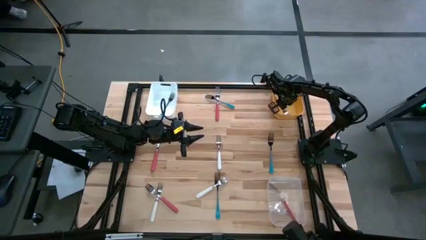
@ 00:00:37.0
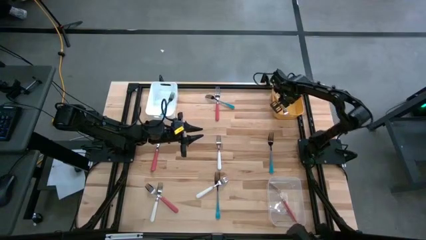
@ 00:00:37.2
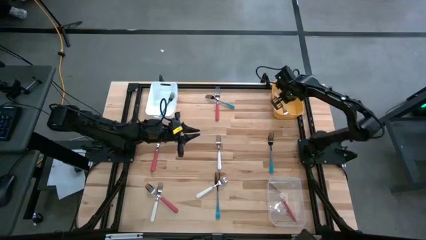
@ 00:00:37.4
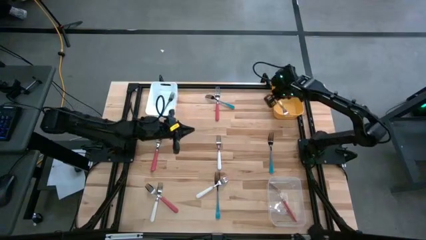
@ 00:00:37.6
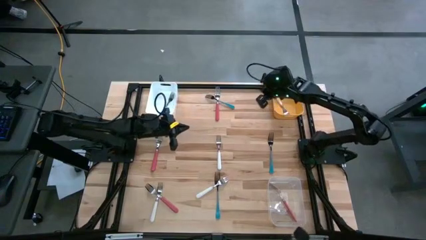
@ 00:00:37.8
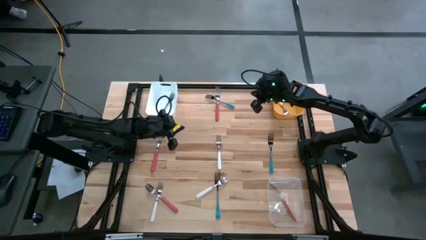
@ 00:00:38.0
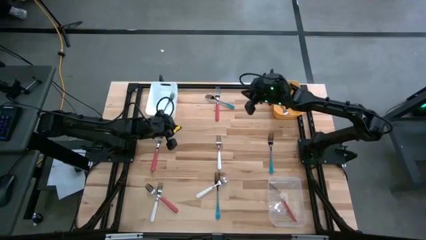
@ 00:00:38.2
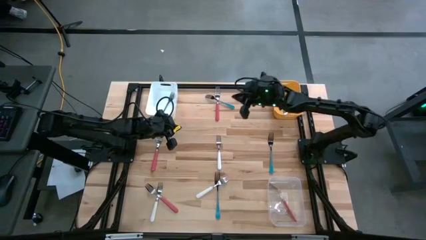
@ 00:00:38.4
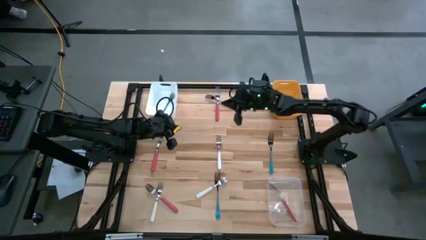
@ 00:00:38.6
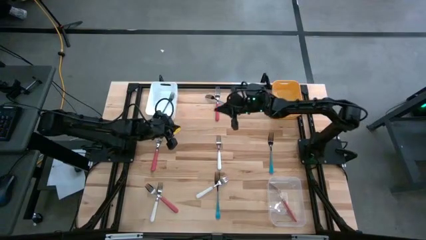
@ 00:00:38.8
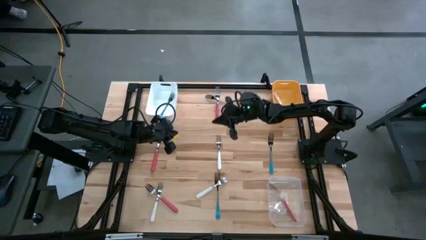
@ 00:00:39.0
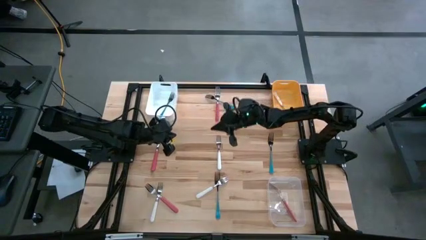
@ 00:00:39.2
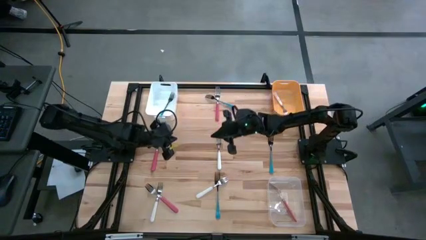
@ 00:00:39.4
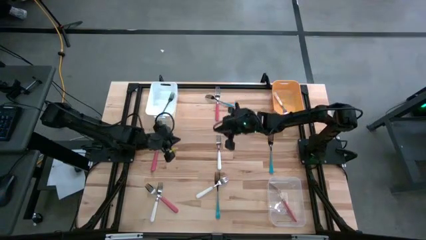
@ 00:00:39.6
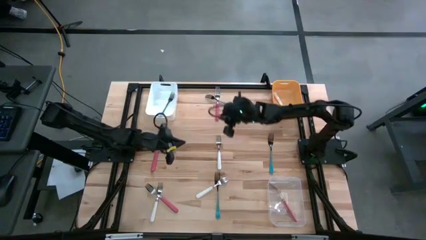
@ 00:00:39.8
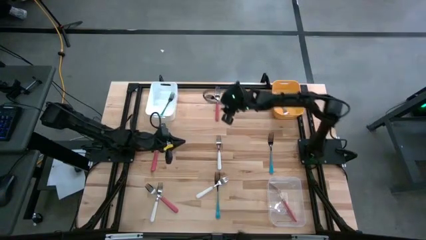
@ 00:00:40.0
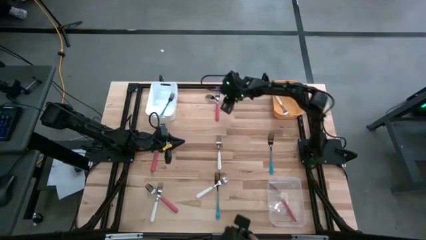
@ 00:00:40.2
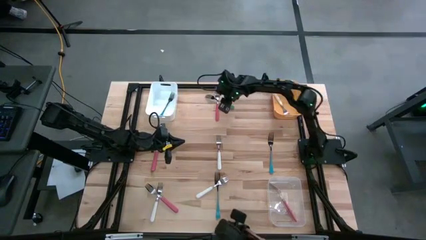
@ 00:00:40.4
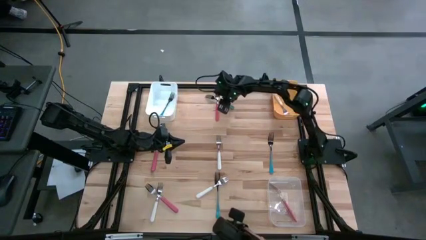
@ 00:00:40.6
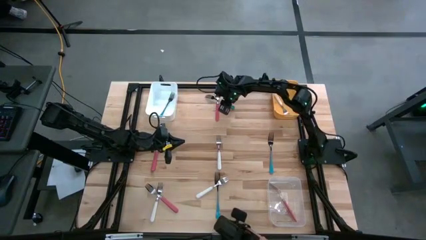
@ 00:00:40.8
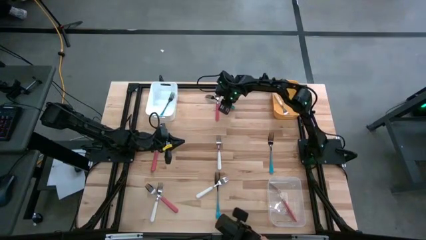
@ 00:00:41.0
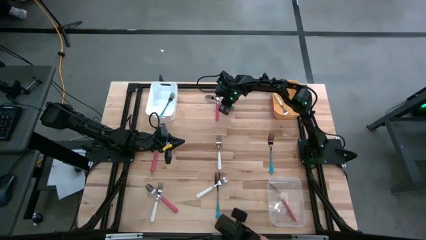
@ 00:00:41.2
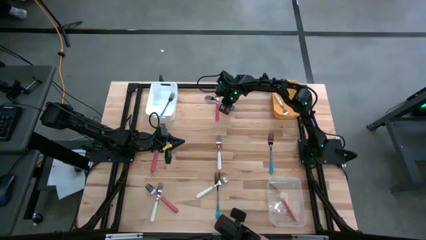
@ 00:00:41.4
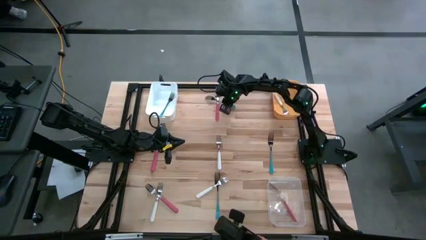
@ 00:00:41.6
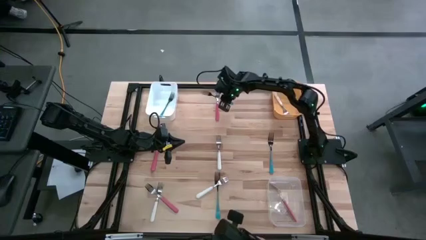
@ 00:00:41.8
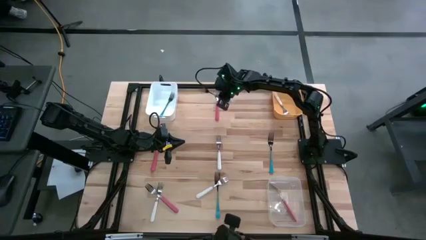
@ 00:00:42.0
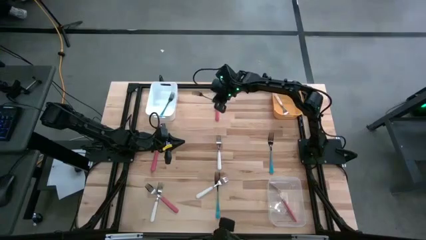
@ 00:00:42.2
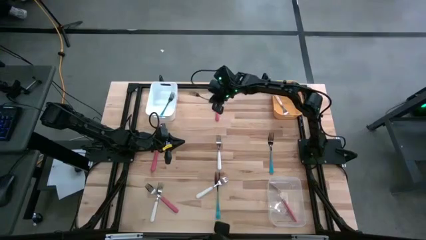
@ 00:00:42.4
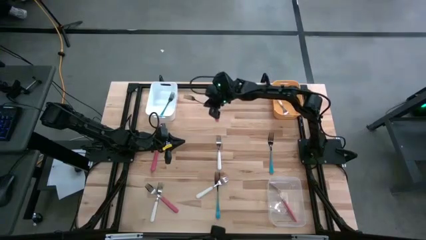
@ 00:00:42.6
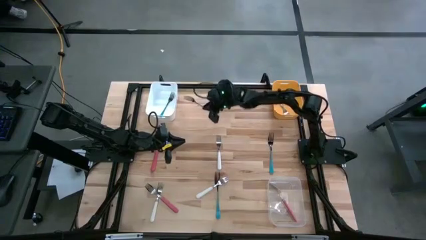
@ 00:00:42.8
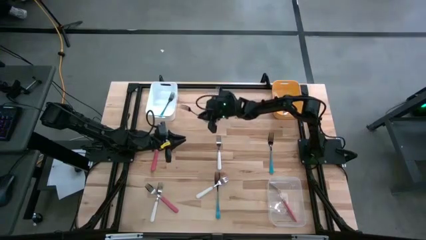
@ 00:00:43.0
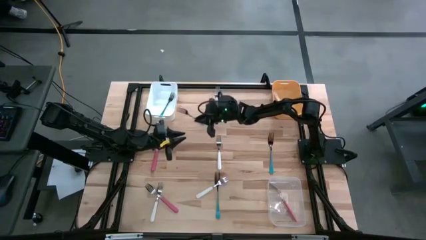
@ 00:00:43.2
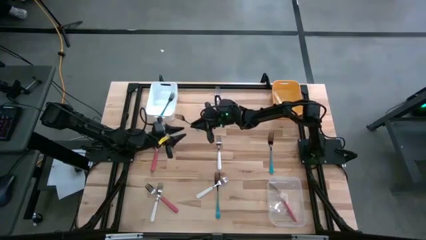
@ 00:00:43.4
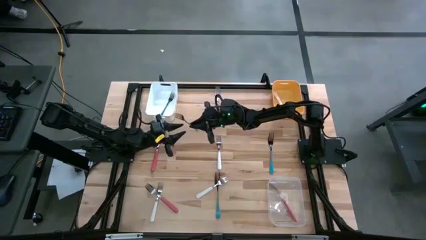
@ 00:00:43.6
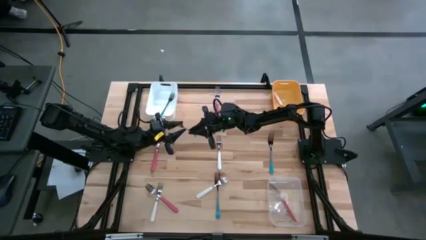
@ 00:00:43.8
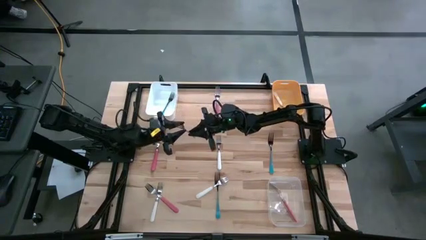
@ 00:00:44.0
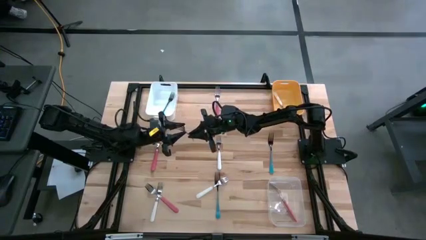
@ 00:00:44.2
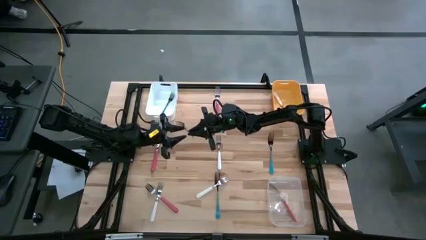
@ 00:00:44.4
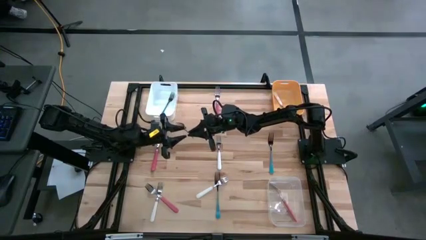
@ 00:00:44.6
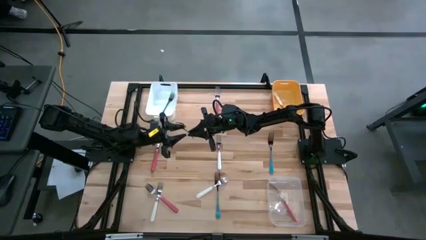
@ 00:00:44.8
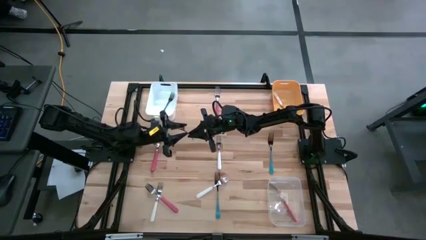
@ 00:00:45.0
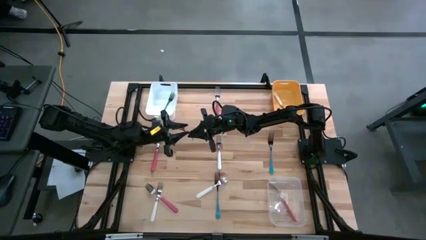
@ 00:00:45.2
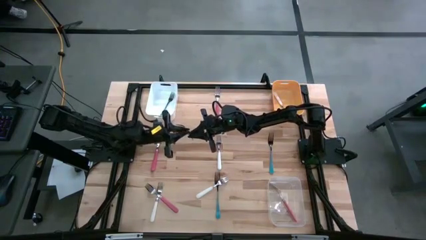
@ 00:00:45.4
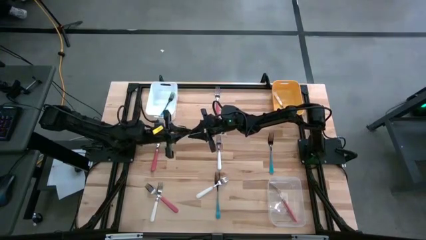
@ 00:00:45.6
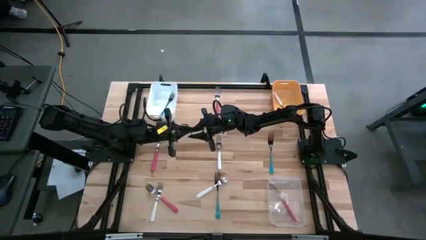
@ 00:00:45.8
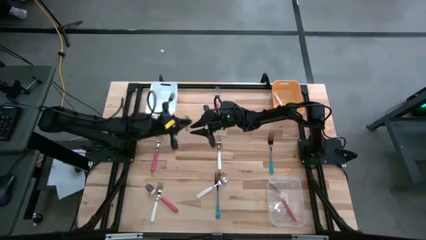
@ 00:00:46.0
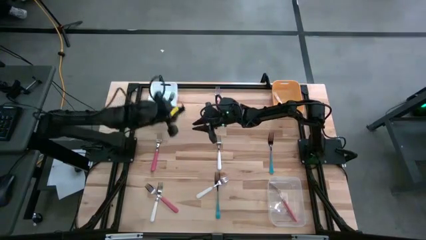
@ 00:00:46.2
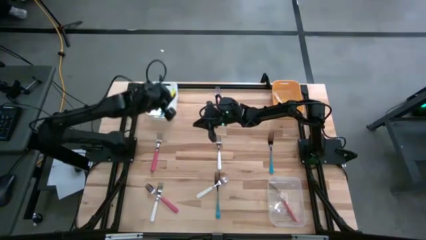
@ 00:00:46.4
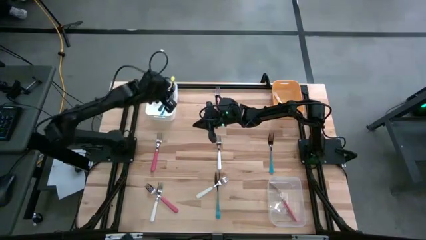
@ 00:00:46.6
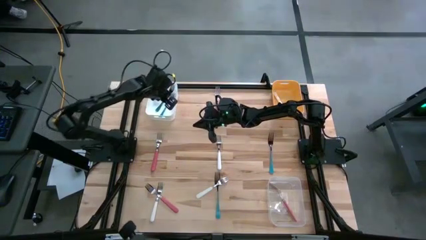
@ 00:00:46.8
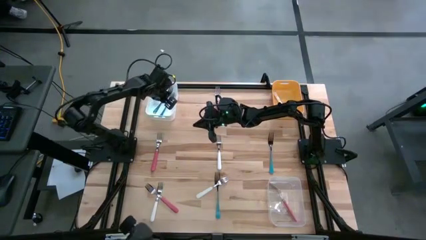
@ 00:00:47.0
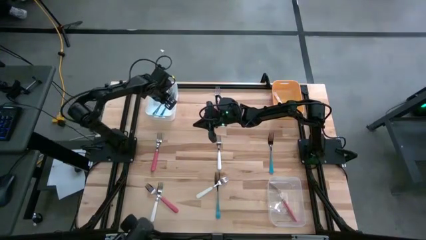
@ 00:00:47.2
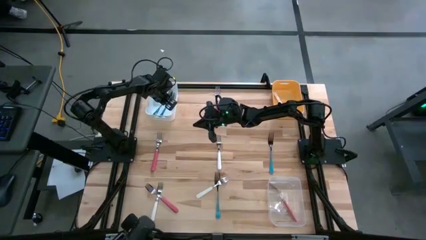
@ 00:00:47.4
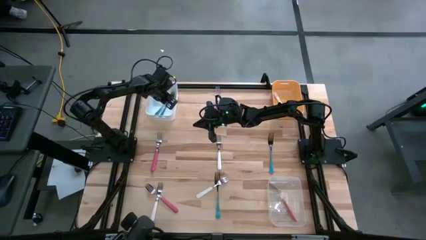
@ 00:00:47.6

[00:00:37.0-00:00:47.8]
Task: Sort silverware by color (type)
Put the top center blue fork into the white bin

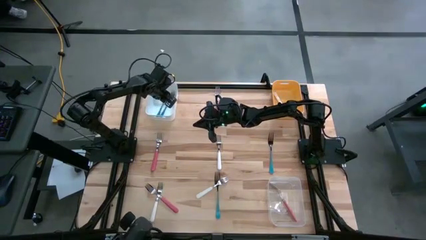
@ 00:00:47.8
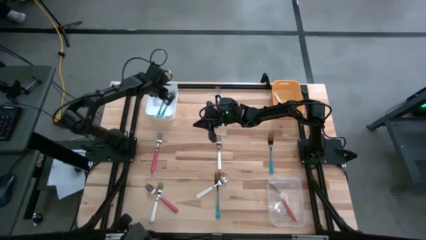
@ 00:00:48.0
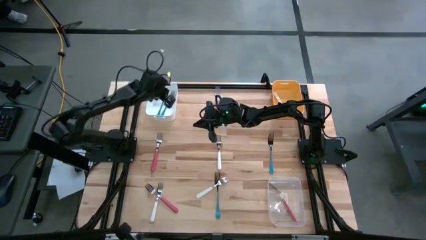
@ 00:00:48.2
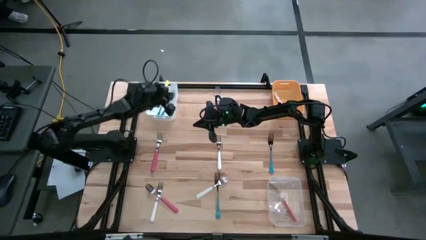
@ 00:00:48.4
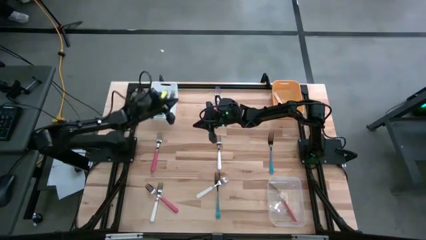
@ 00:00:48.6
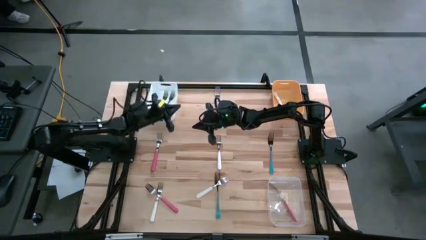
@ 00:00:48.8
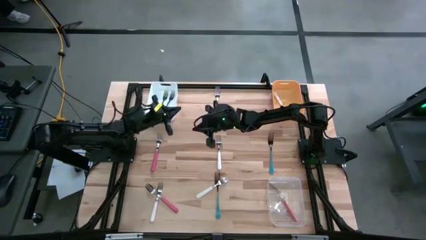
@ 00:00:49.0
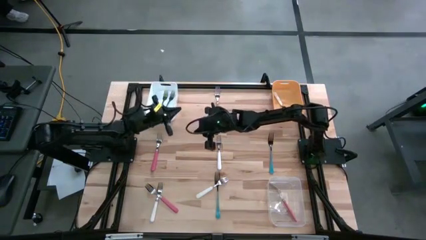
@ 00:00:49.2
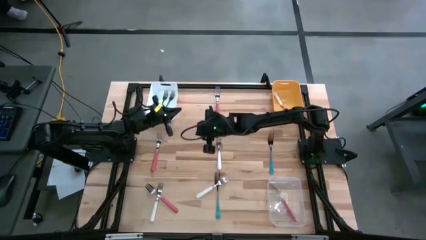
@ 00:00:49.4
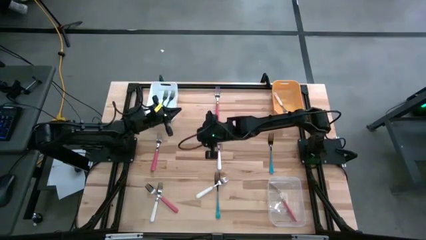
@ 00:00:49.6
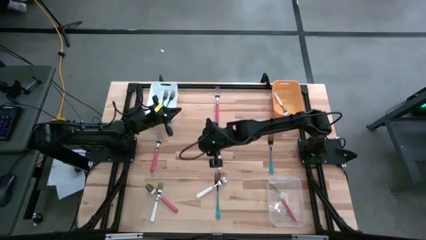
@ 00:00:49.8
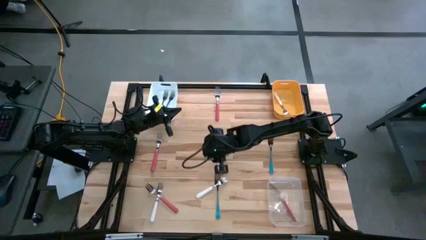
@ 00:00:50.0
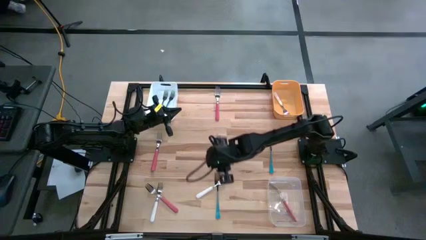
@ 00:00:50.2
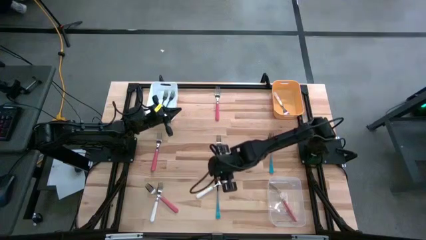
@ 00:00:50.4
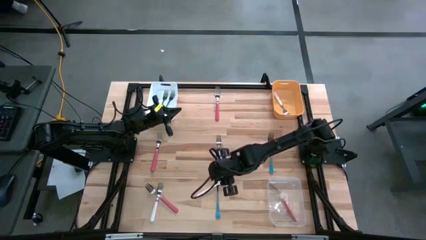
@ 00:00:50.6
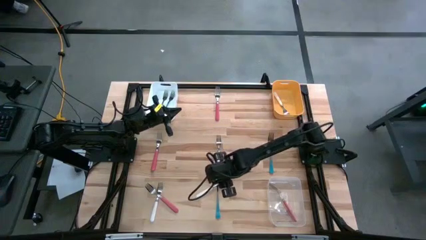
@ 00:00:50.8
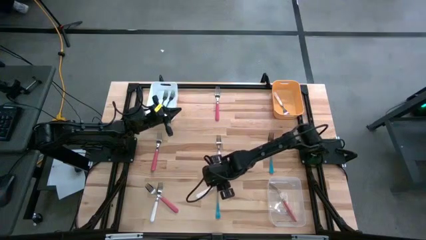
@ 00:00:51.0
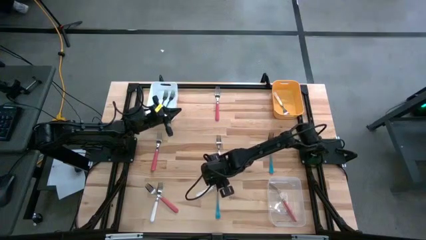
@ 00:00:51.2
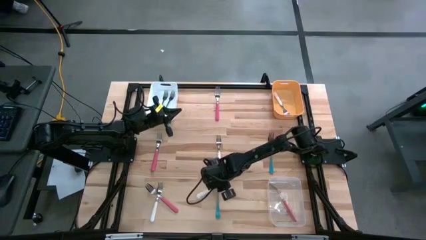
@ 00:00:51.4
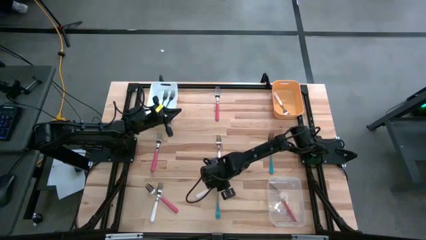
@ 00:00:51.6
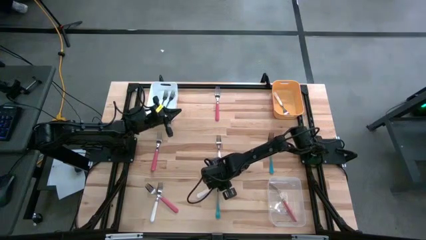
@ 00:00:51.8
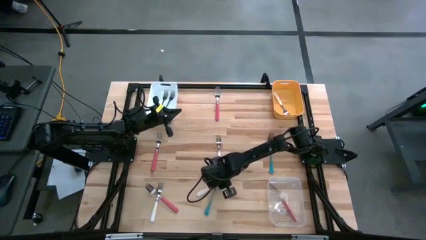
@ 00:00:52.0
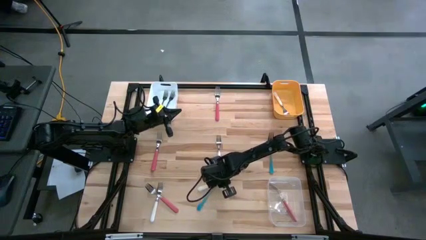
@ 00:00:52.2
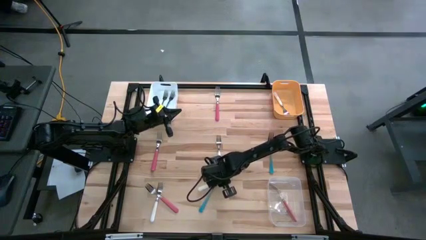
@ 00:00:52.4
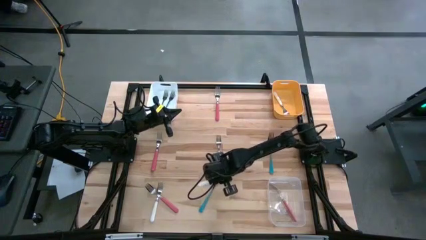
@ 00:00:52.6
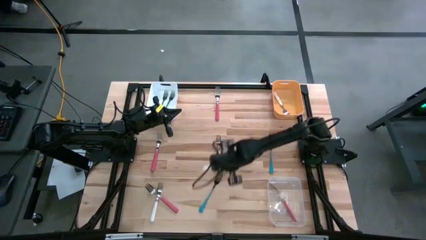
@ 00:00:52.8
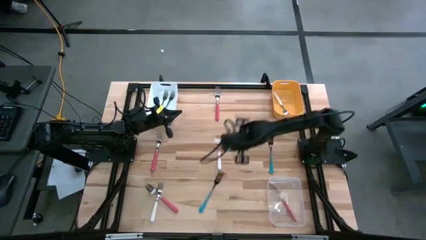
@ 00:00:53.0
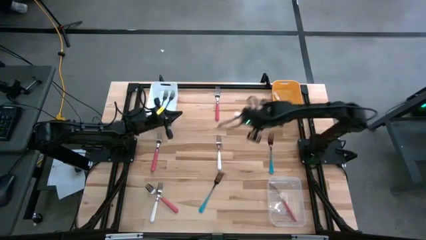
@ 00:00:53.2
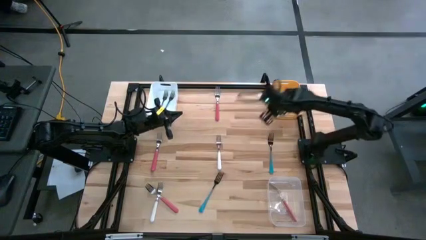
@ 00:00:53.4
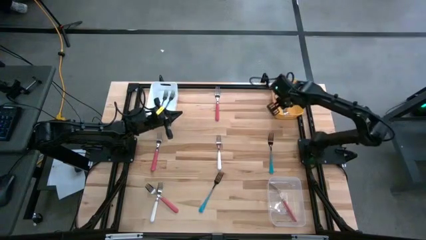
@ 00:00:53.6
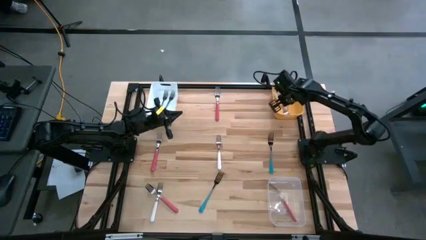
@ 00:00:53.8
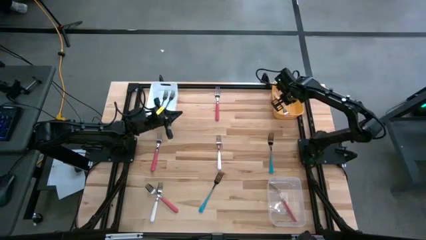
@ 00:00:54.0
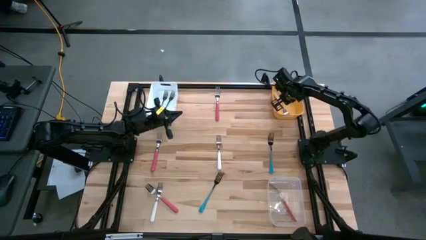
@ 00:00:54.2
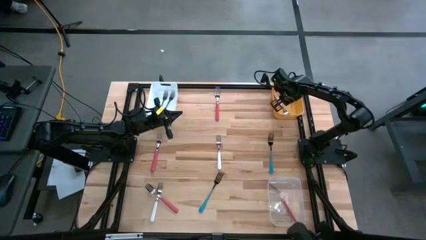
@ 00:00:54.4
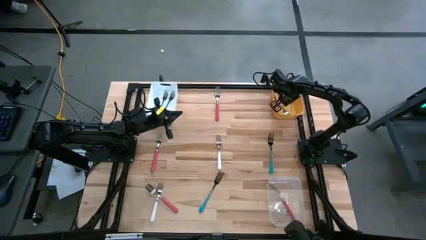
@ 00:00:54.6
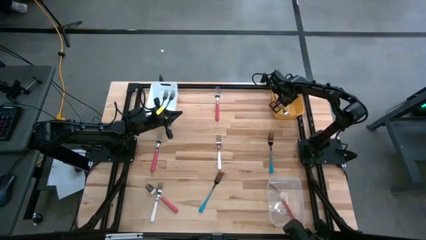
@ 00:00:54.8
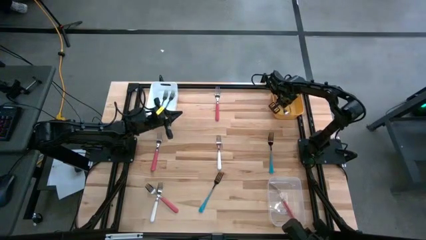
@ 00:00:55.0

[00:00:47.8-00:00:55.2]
Put the bottom center white fork into the yellow bin
